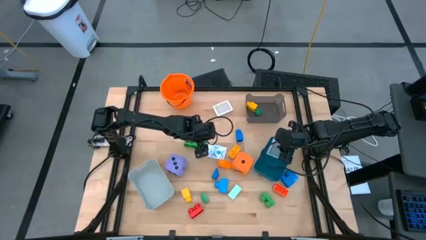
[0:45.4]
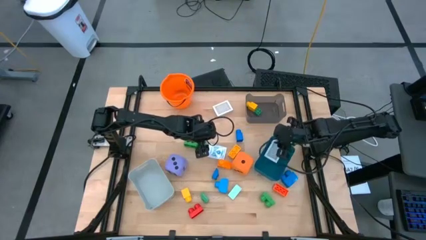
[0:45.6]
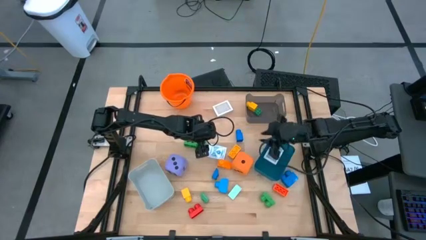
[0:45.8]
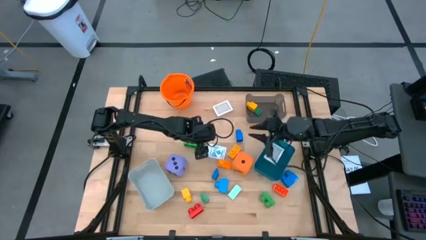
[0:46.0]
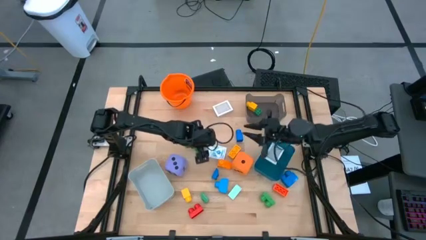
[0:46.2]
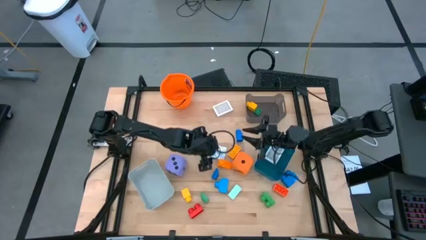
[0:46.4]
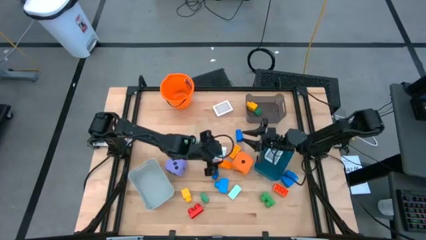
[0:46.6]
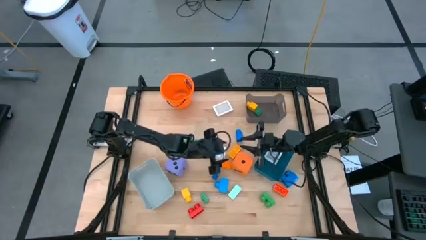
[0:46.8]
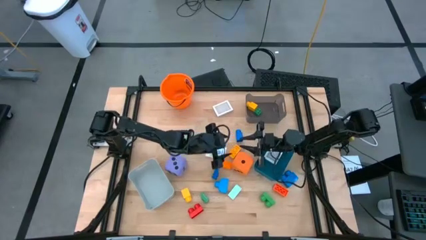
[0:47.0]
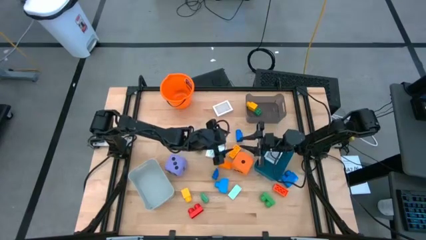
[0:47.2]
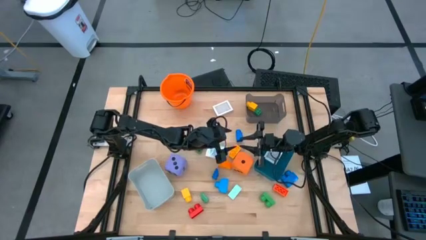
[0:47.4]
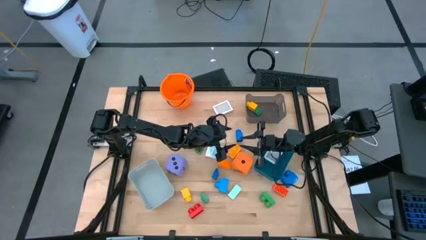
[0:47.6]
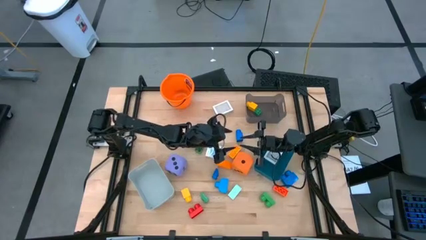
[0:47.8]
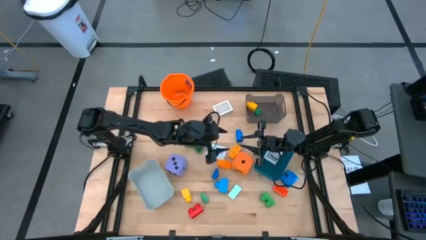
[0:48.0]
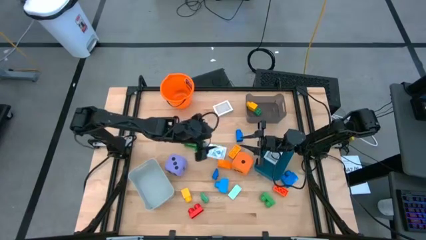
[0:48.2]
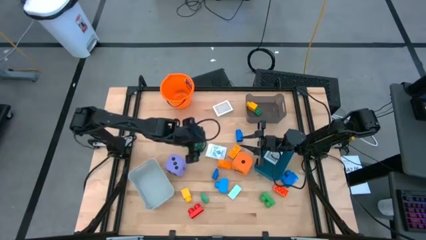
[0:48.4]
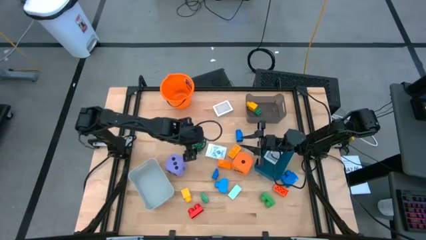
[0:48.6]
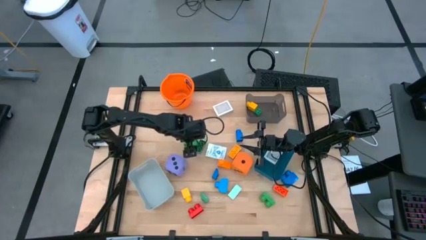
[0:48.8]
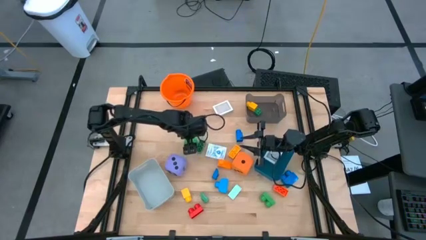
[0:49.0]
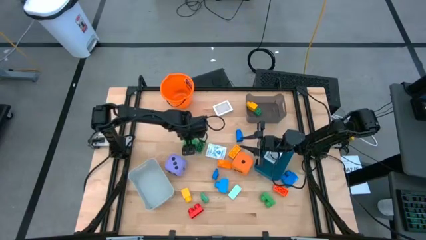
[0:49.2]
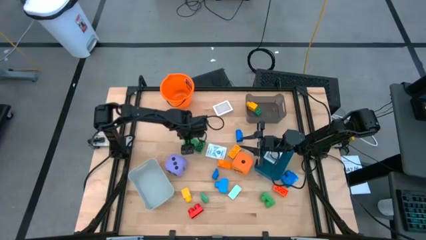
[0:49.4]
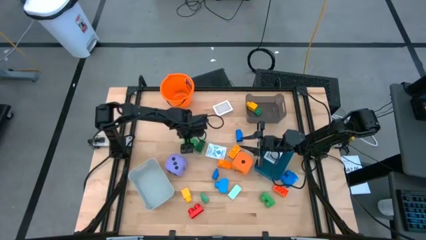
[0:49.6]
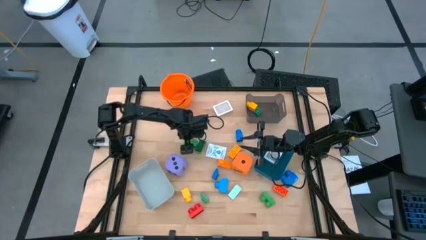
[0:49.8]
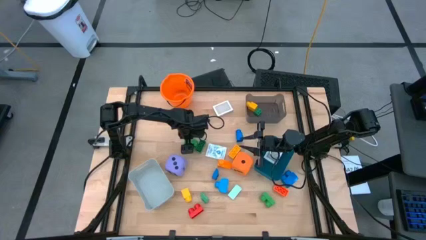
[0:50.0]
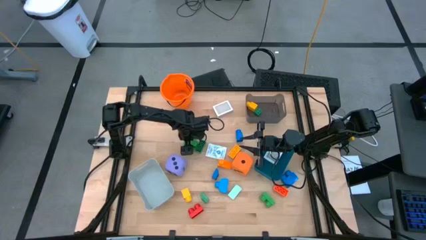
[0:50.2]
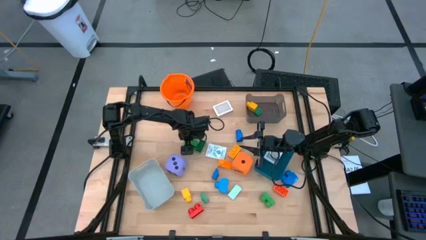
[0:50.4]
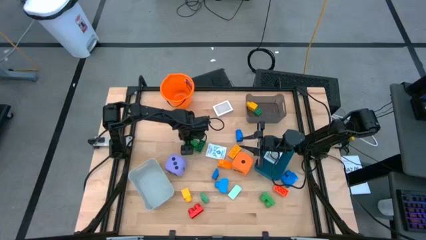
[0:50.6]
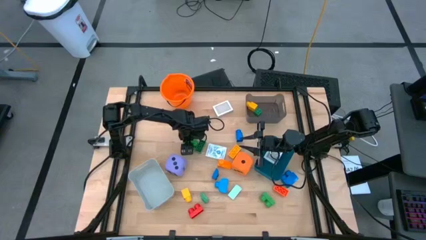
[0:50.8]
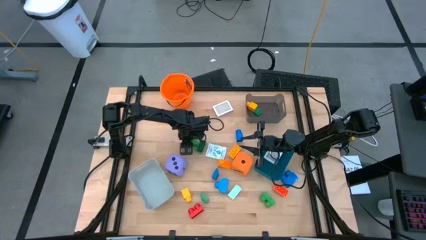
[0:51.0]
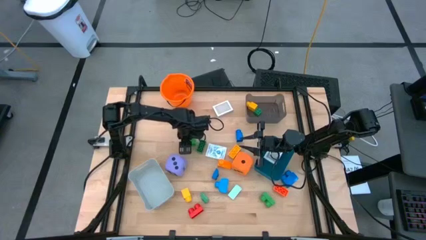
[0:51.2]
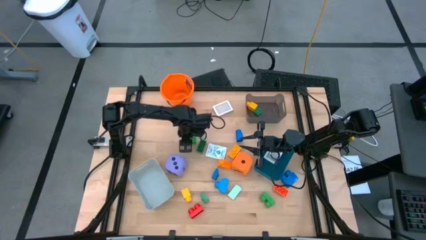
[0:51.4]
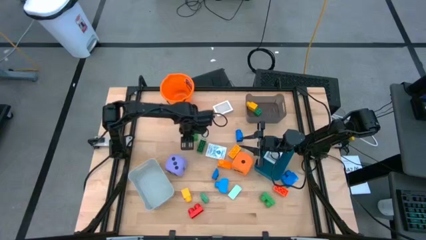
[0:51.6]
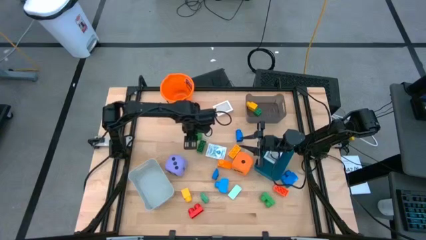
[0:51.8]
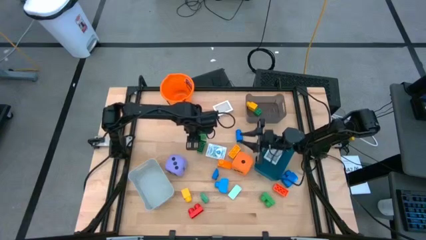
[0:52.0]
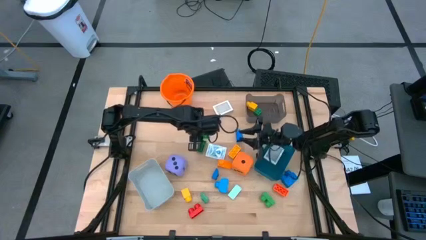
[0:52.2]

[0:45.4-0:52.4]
Task: Pick & Place Toys
Put the green game piece into the black bin

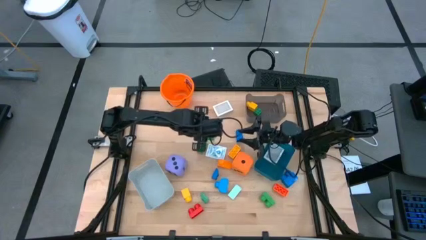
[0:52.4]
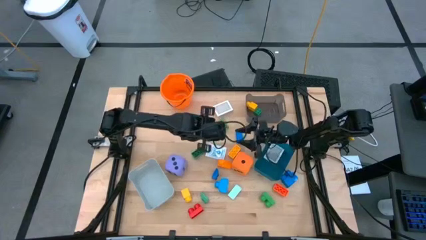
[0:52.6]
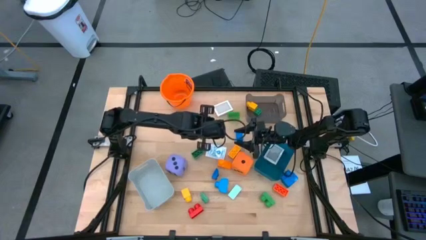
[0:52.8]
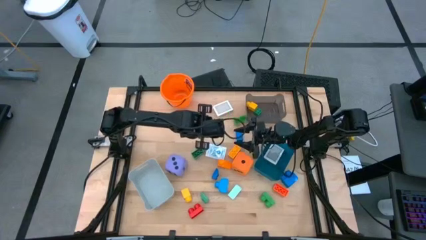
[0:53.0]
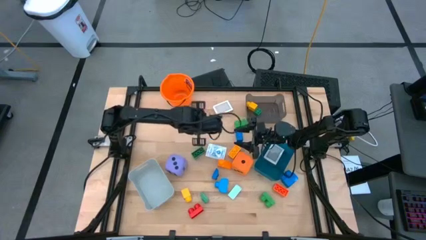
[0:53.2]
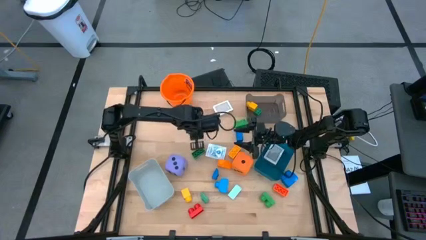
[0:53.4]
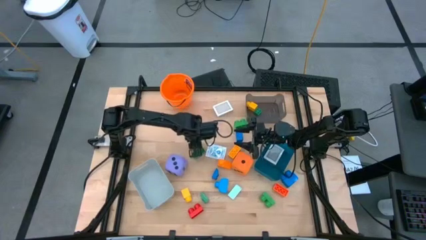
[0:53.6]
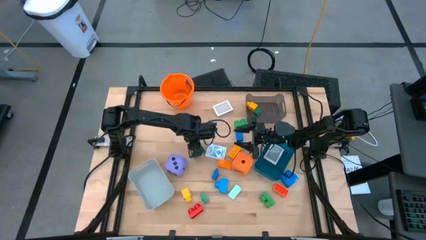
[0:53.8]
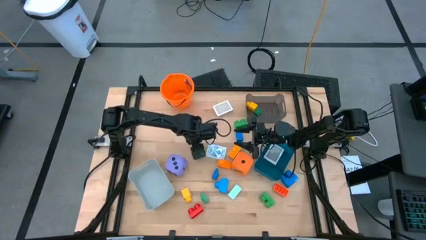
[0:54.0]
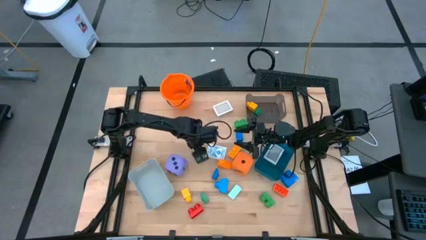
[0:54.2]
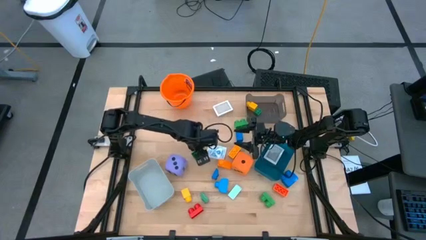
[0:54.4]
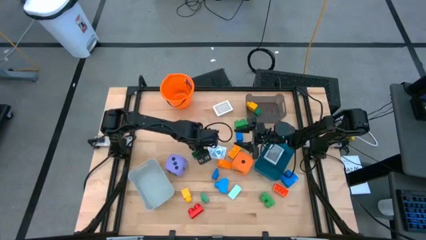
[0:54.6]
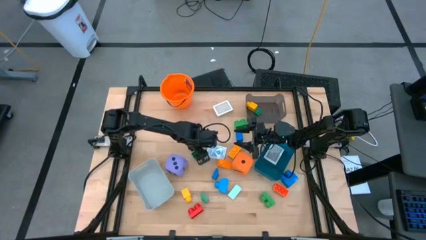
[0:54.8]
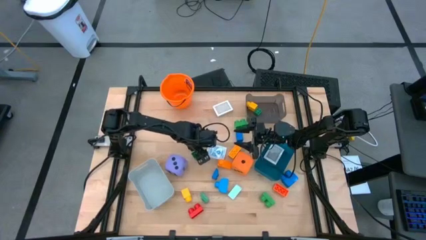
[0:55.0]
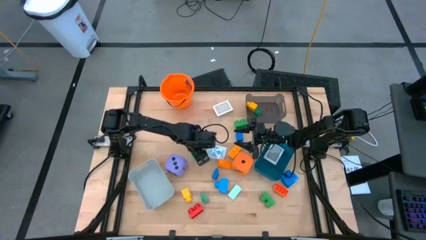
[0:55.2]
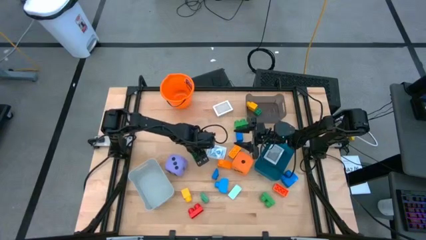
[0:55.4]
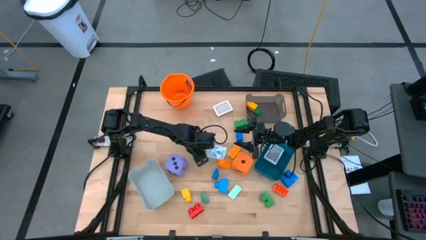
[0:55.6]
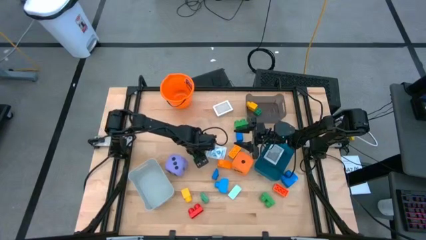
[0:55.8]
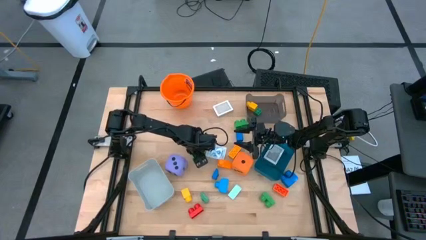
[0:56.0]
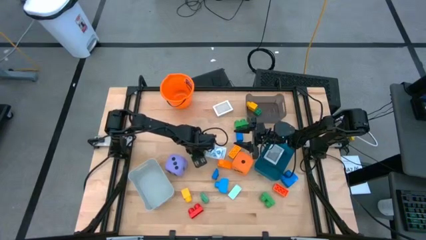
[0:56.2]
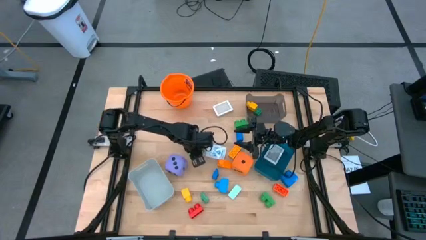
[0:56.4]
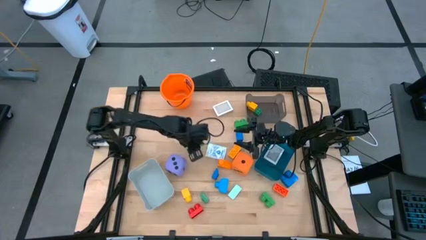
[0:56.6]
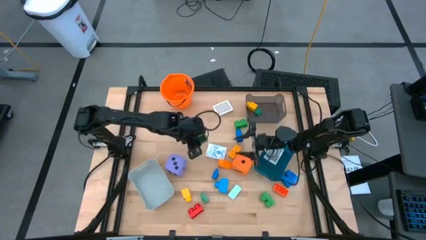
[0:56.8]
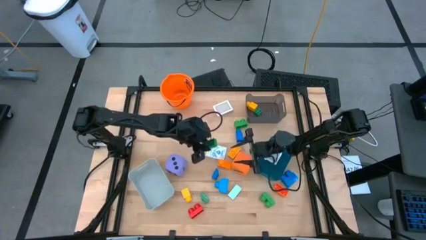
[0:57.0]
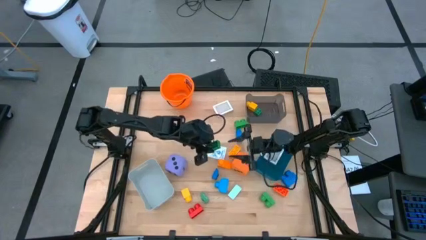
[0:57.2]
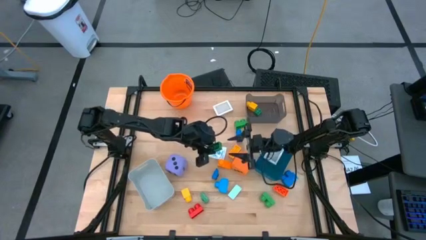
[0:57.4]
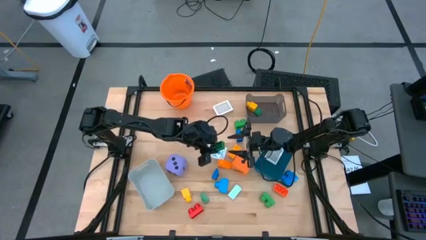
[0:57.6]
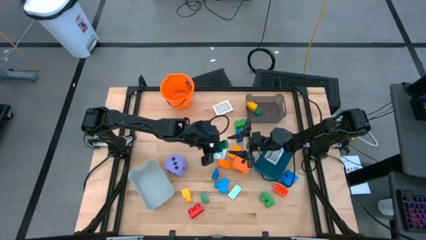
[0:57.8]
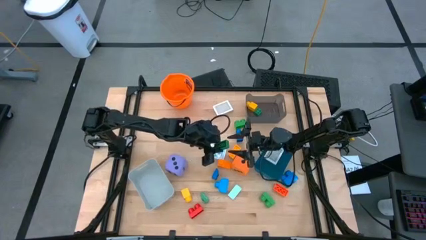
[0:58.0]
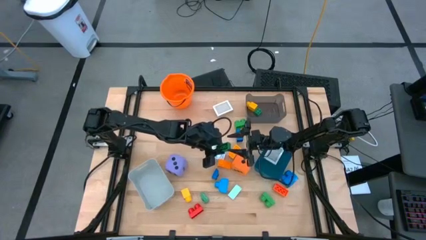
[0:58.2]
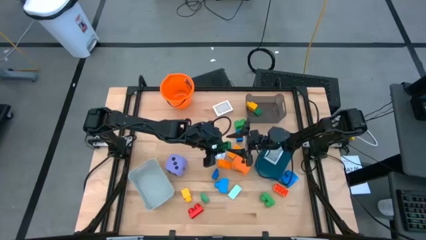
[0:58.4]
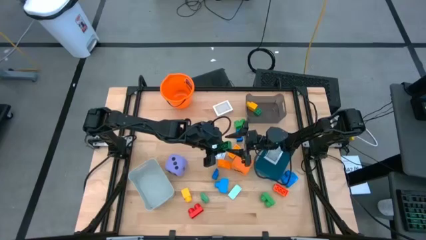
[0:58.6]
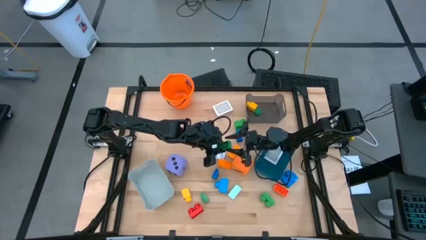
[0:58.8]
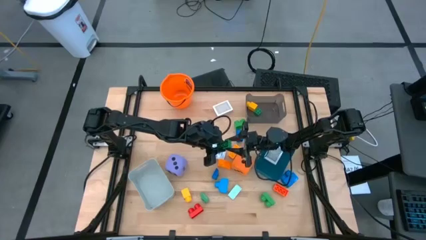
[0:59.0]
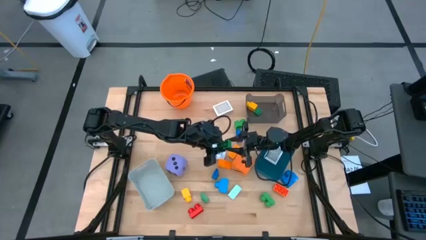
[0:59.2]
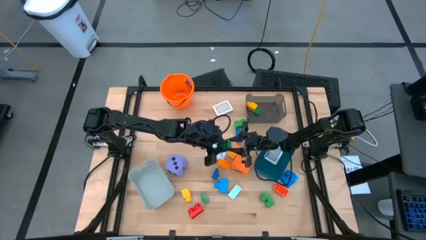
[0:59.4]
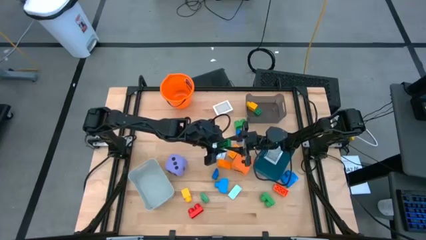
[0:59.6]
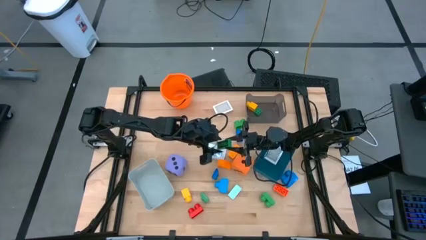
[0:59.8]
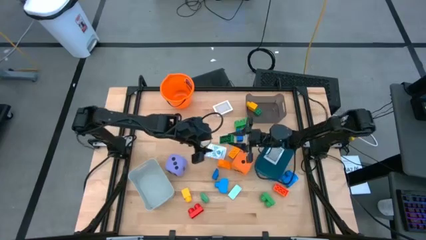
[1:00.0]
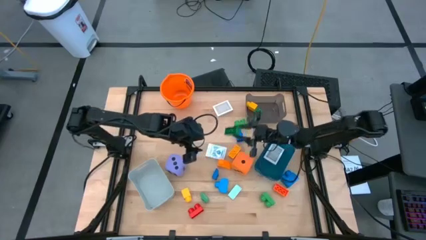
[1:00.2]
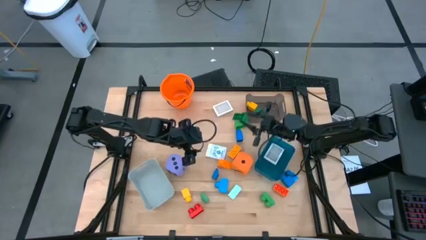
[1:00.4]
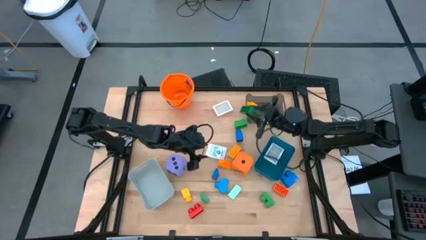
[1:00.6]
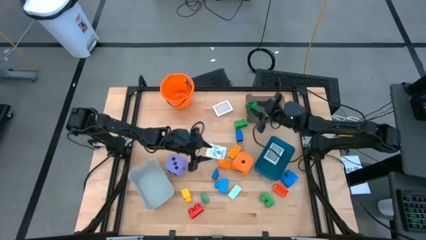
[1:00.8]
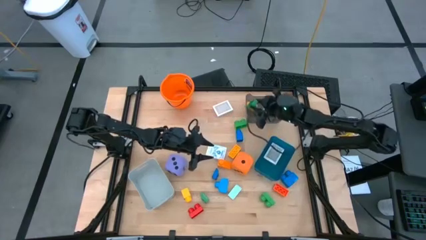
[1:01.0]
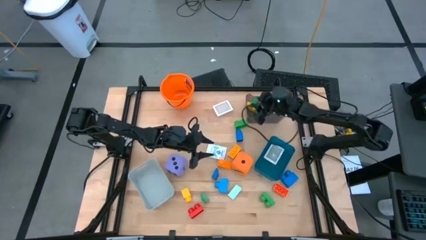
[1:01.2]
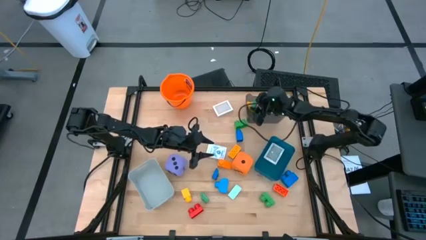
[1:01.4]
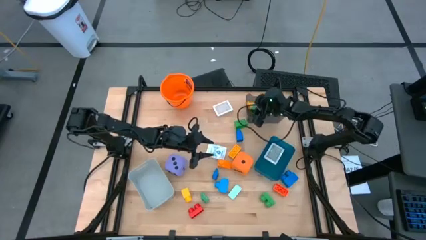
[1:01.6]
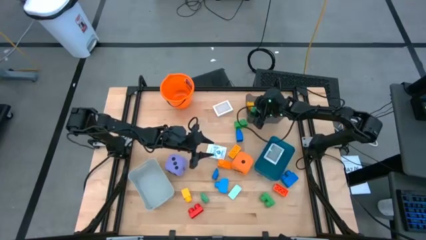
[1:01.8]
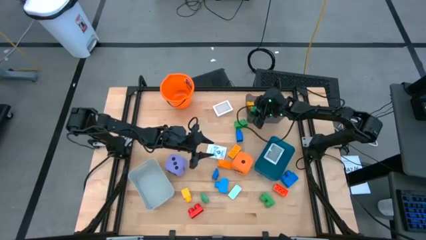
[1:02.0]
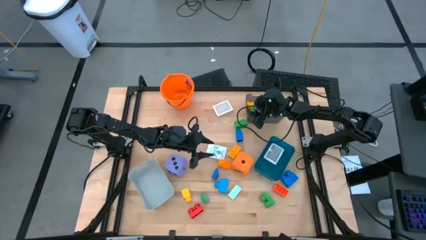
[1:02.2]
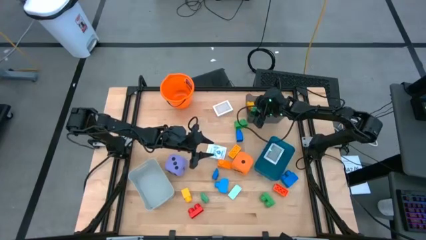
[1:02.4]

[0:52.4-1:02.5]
Put the green game piece into the black bin
